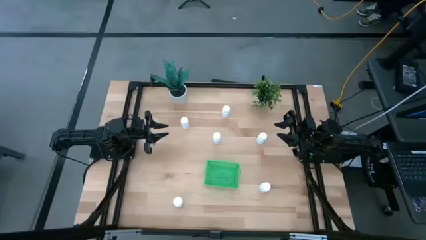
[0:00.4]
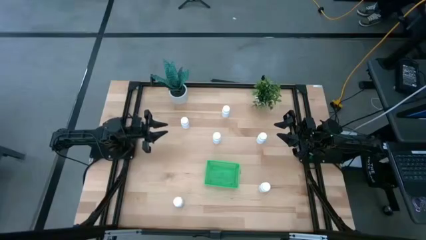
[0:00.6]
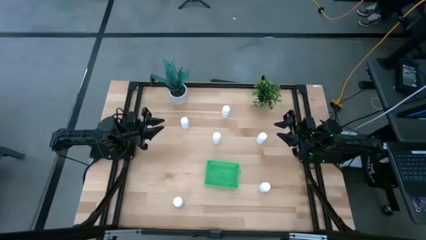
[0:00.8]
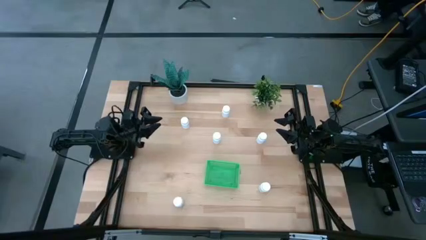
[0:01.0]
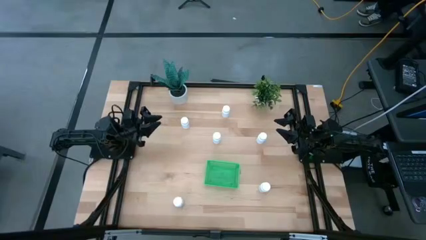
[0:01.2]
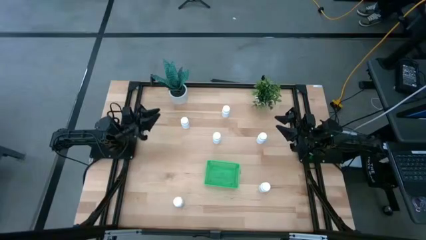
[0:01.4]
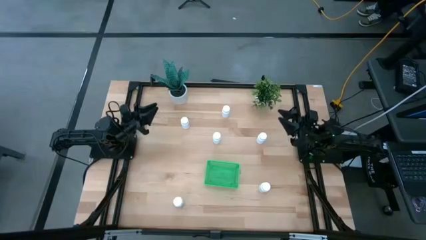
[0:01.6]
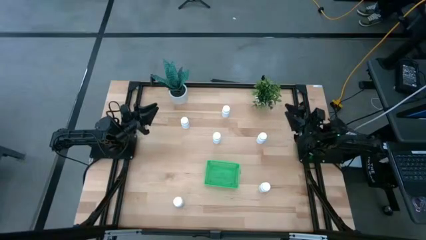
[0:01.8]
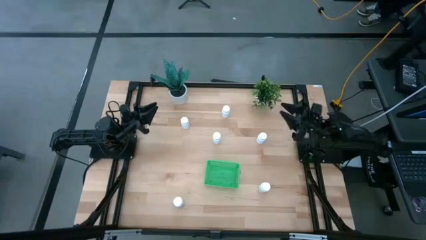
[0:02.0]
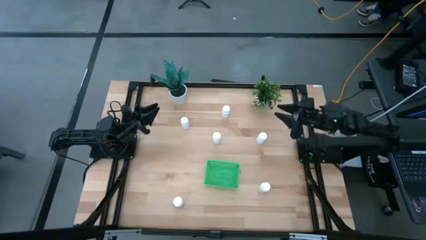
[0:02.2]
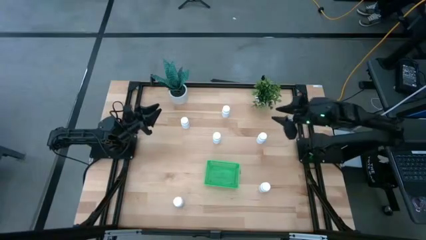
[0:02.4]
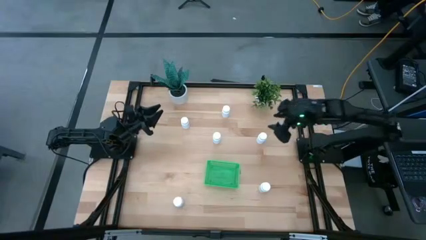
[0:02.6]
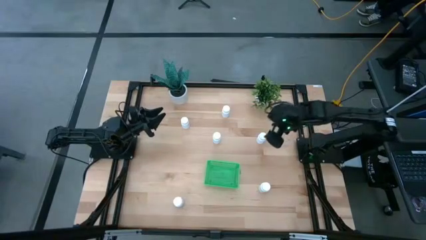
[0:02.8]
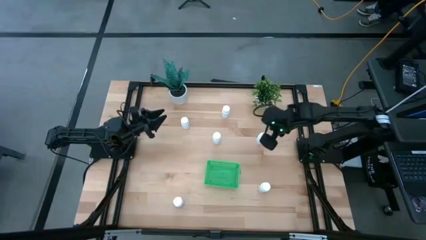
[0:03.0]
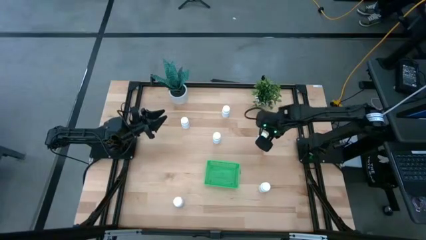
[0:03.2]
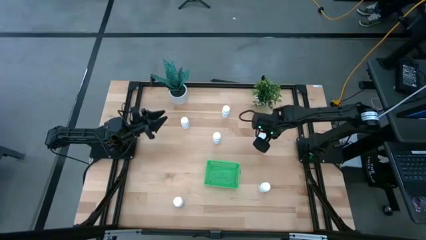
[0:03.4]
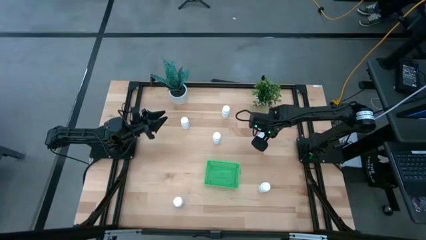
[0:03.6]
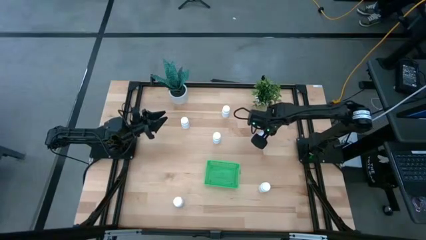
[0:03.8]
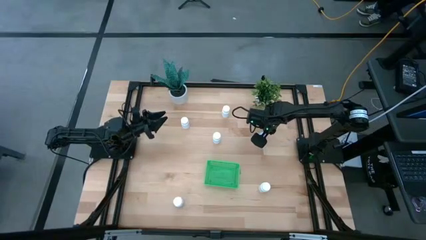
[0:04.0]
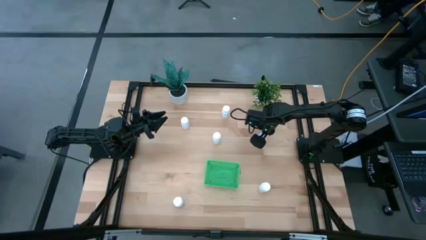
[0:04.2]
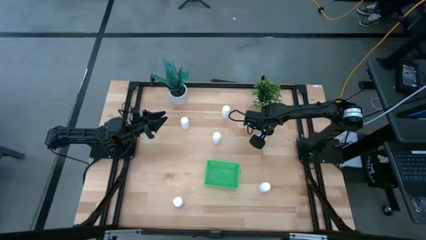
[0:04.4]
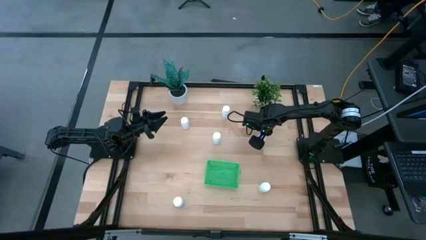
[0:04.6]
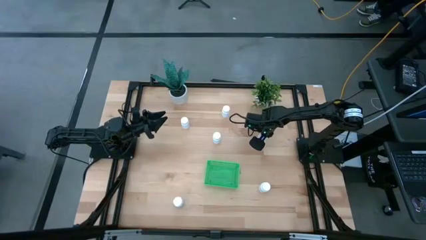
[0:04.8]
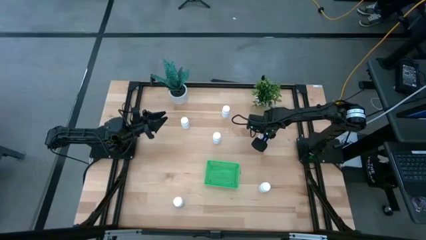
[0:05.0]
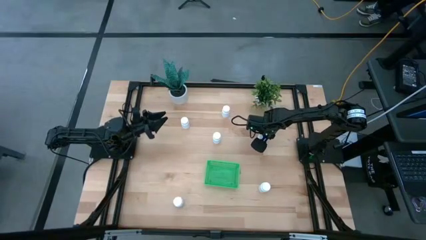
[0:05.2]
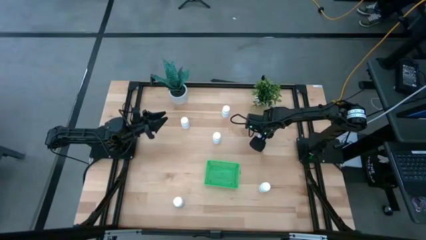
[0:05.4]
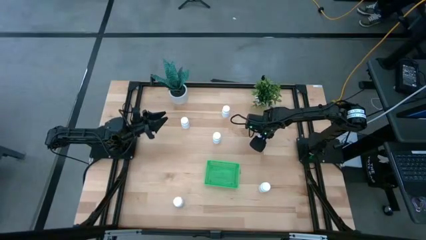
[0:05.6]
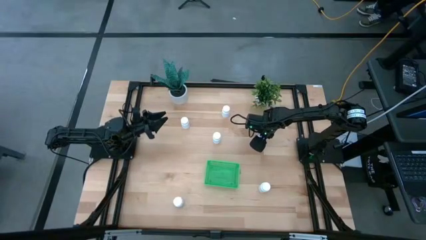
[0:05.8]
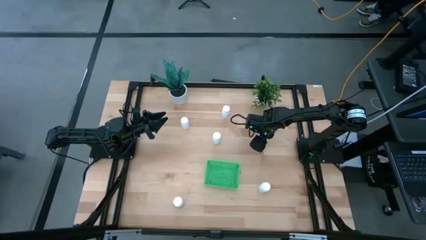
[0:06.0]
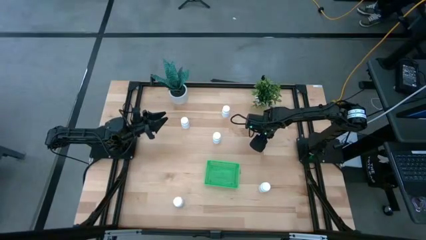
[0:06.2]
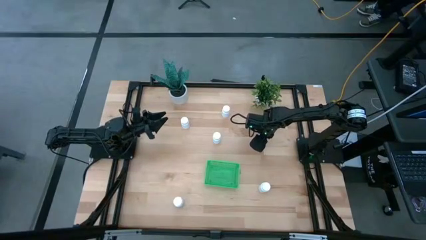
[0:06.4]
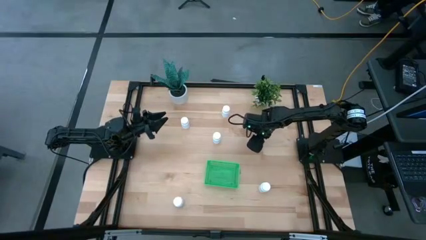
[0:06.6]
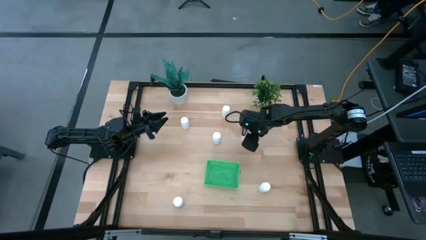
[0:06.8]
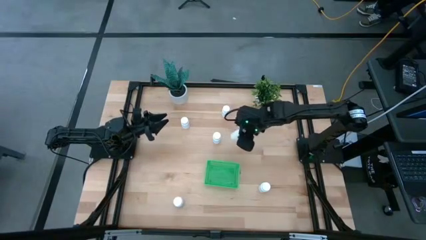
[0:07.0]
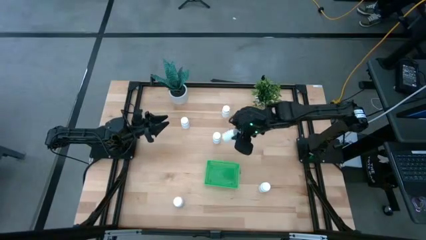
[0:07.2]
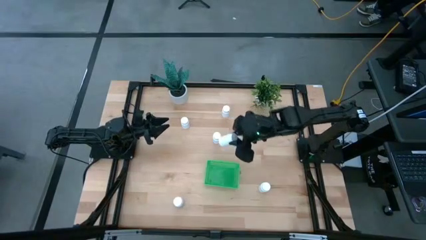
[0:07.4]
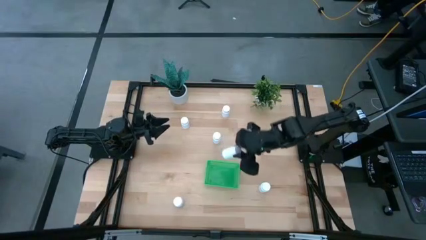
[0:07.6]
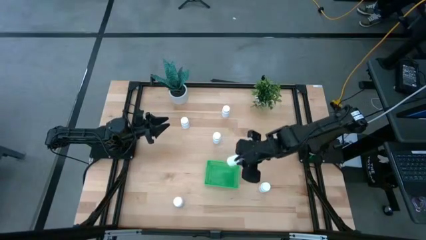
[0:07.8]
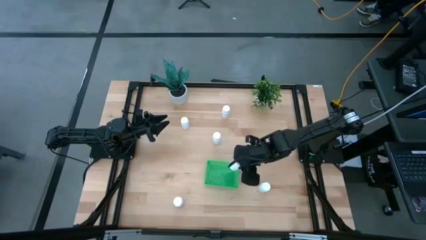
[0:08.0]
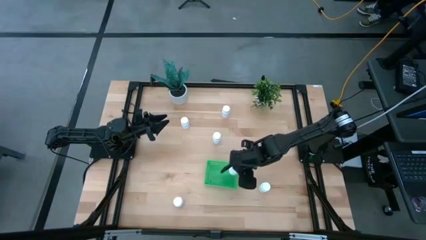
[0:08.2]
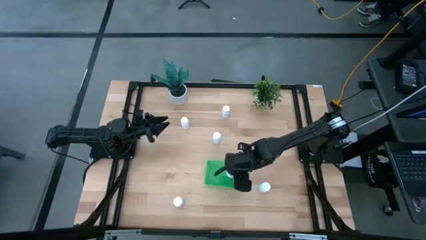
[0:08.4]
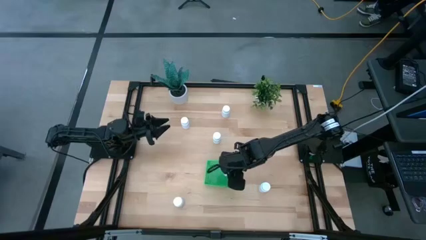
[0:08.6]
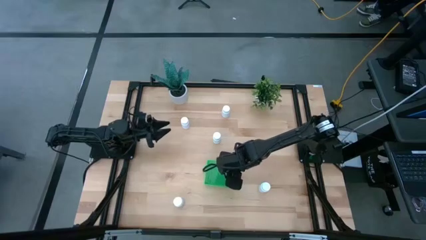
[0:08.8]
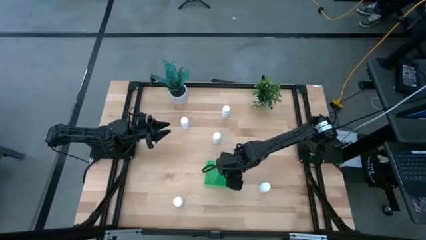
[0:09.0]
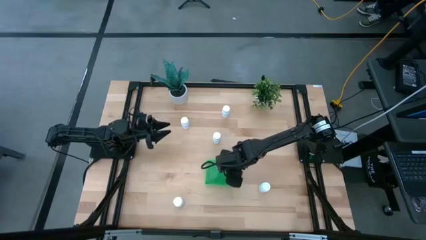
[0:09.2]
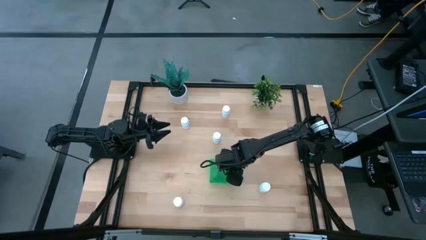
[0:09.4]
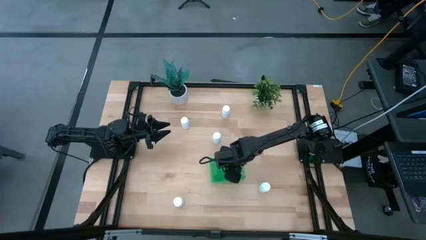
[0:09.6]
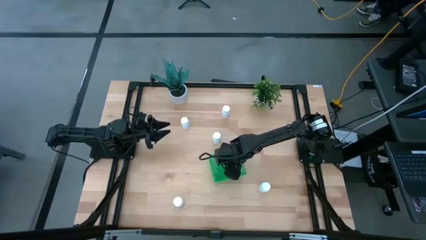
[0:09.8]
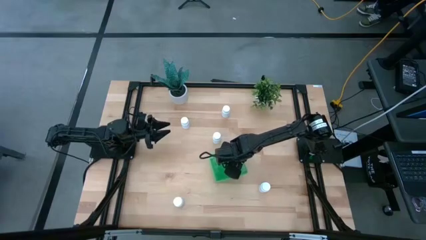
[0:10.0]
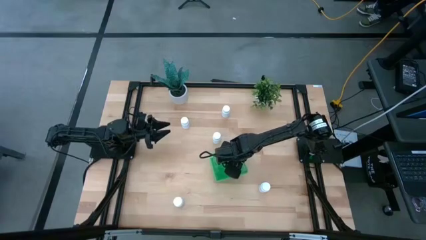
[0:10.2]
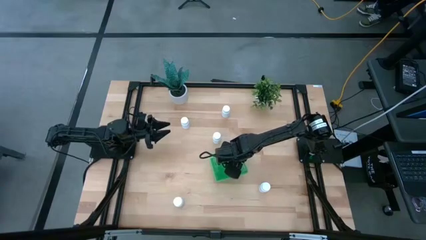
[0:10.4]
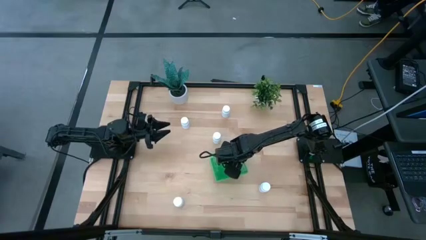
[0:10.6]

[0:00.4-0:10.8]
Task: Pick and place pill bottles into a basket
Put the white medicine bottle into the green basket
